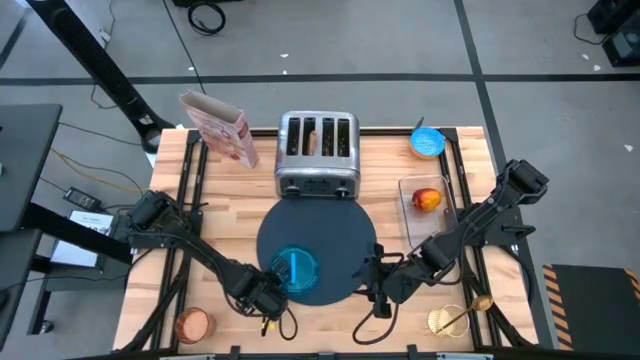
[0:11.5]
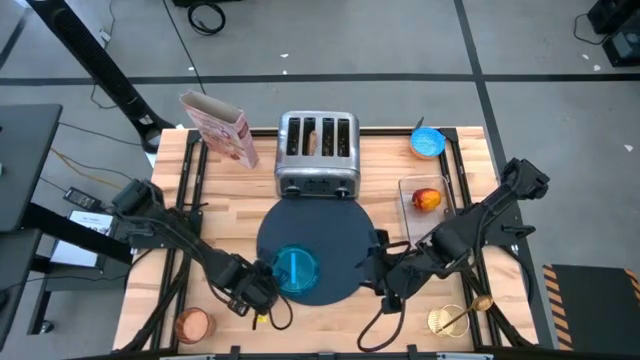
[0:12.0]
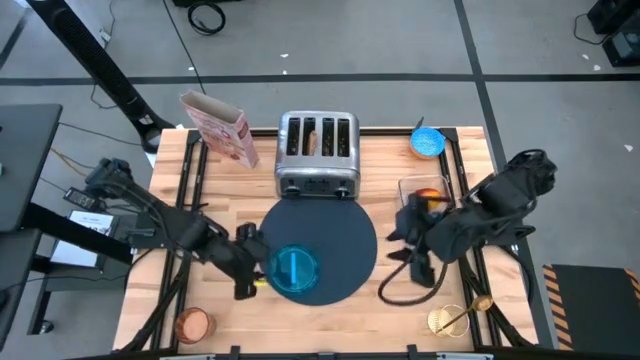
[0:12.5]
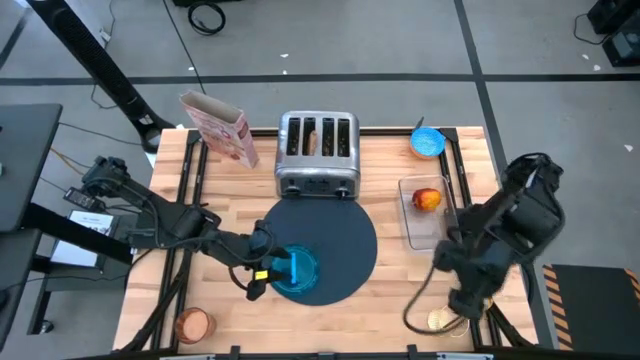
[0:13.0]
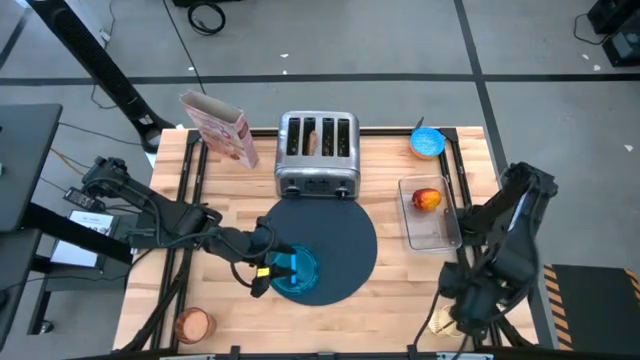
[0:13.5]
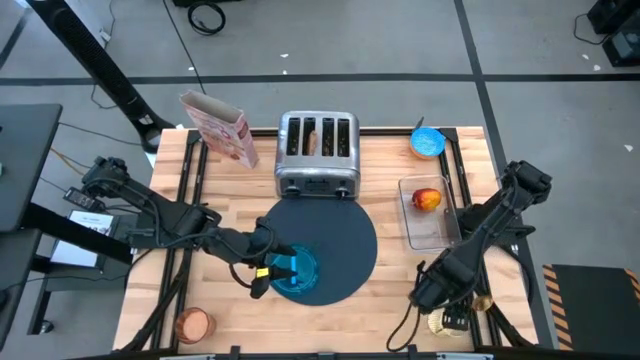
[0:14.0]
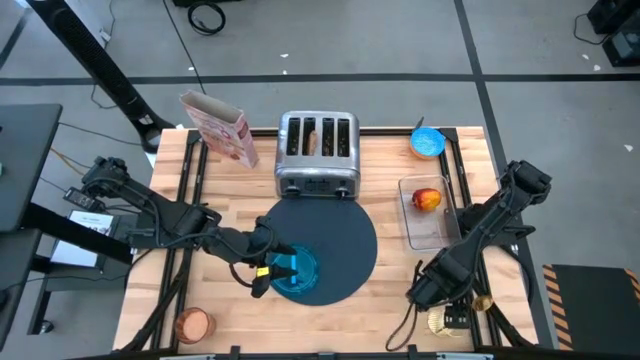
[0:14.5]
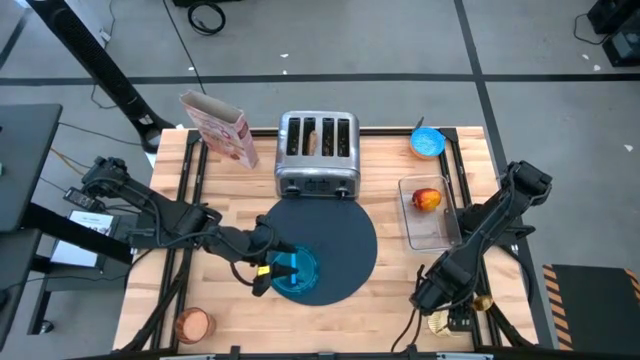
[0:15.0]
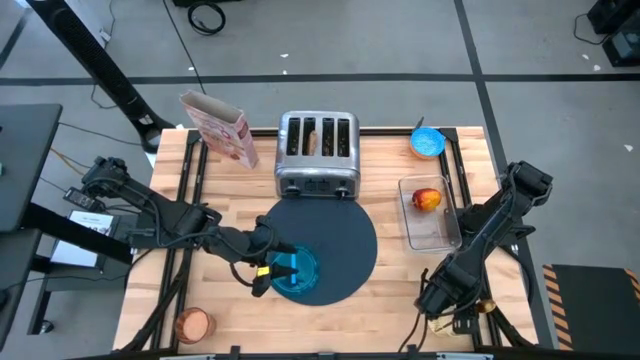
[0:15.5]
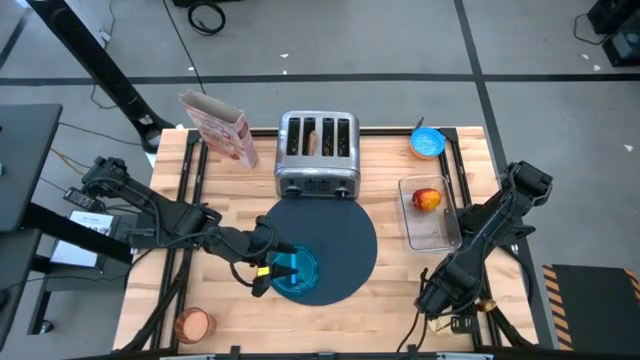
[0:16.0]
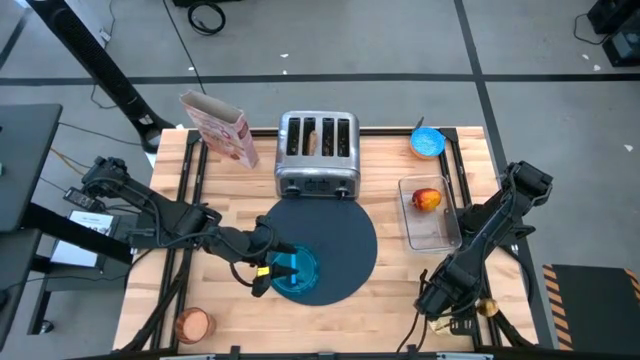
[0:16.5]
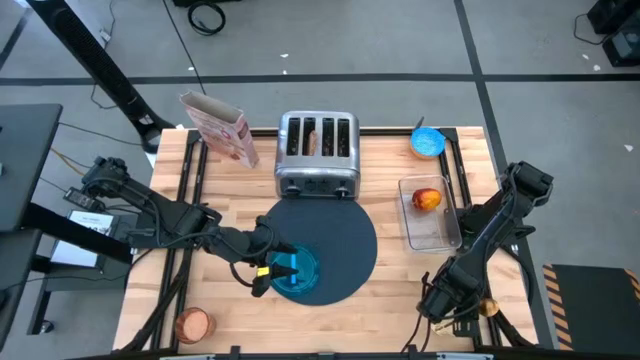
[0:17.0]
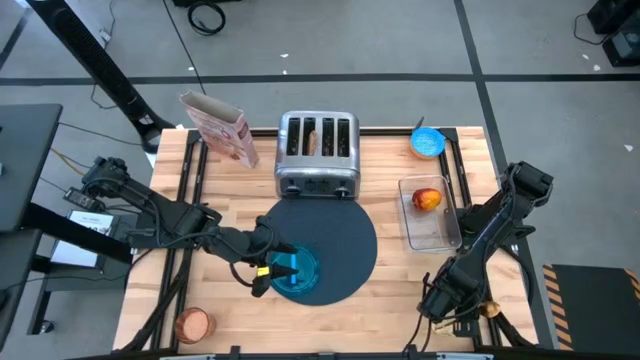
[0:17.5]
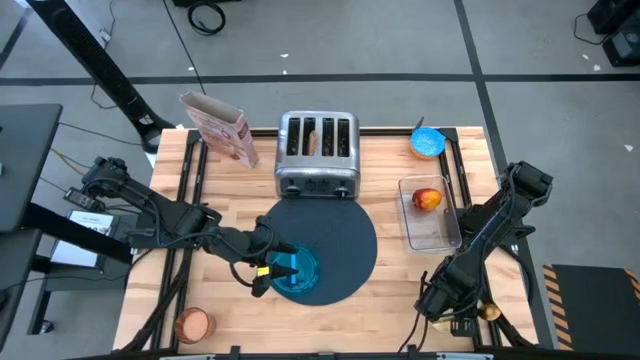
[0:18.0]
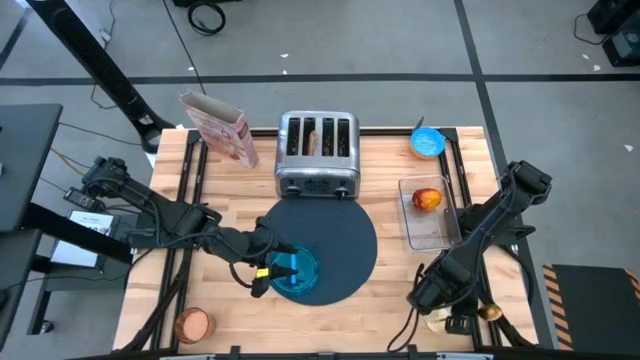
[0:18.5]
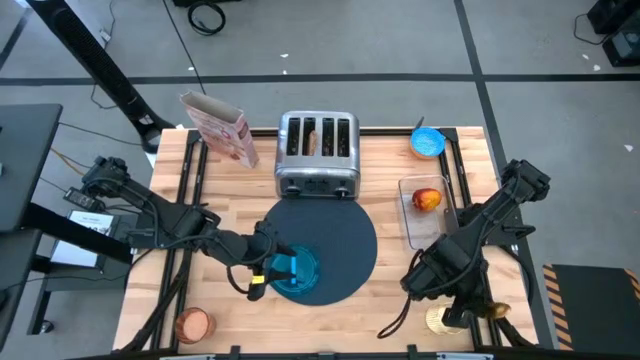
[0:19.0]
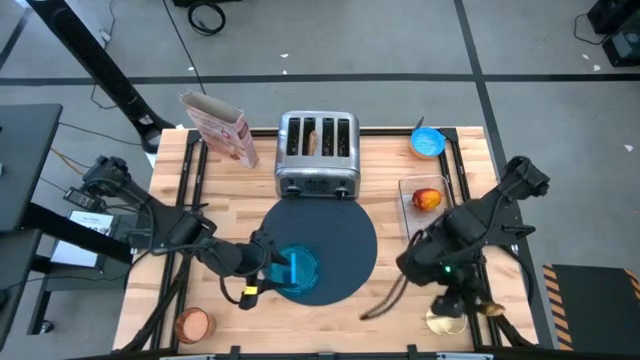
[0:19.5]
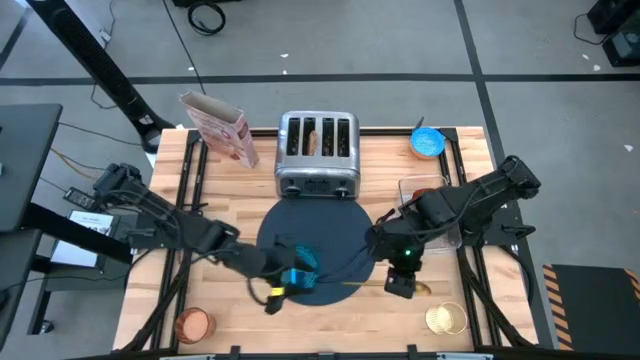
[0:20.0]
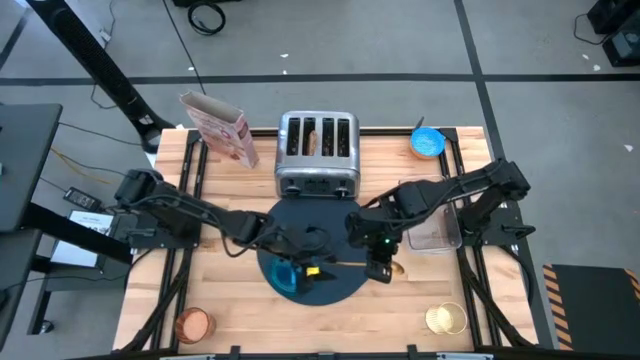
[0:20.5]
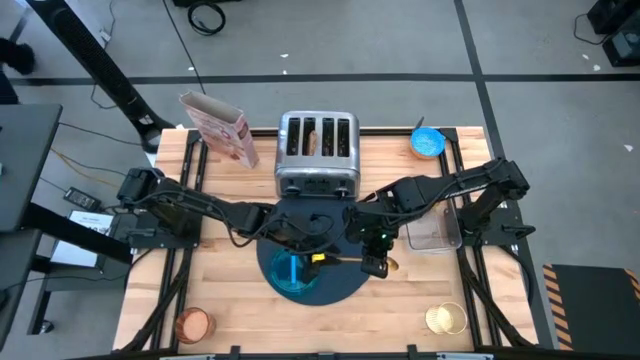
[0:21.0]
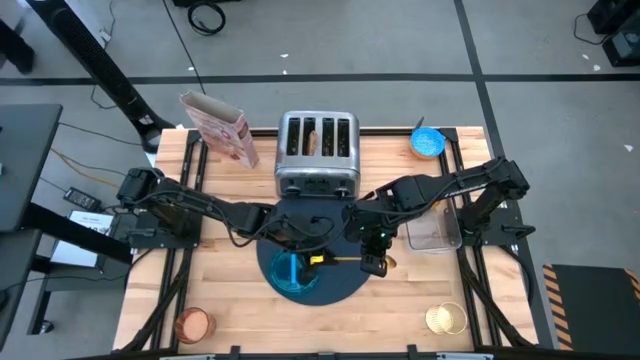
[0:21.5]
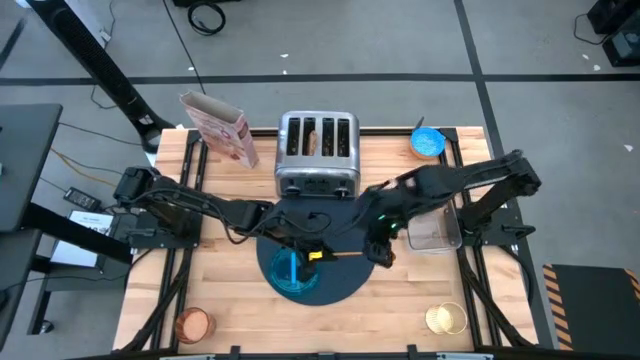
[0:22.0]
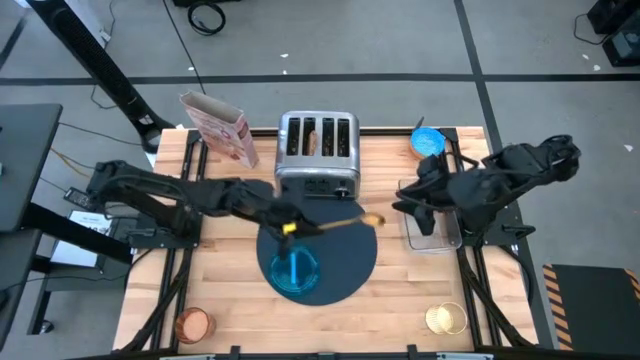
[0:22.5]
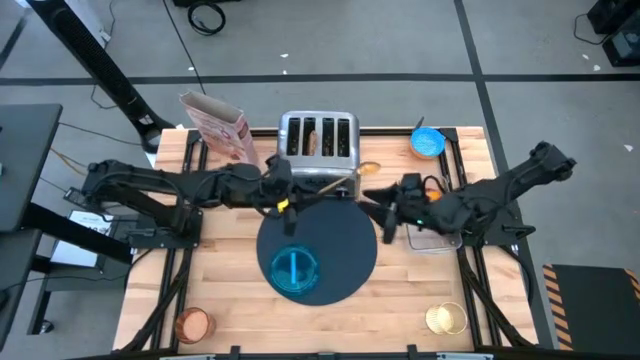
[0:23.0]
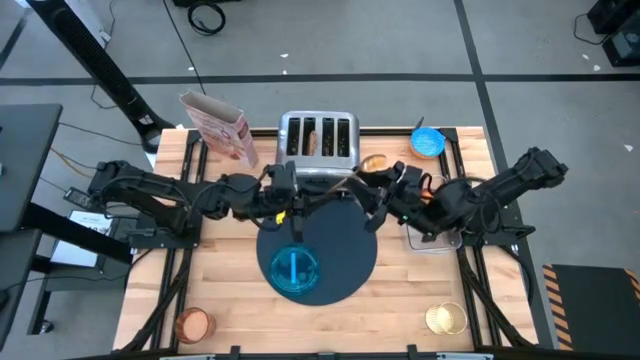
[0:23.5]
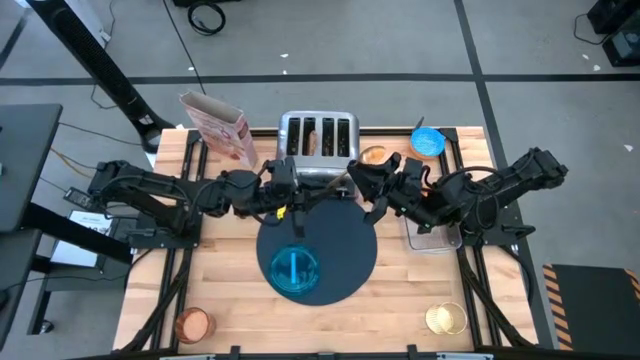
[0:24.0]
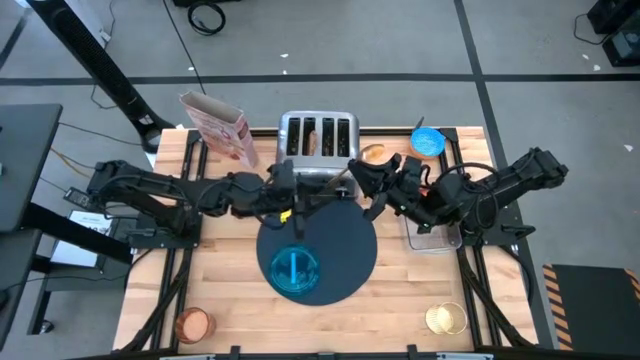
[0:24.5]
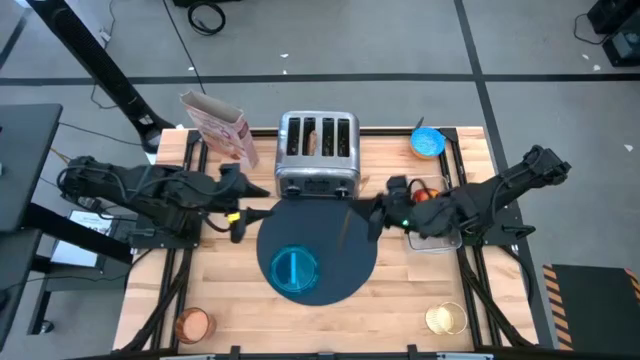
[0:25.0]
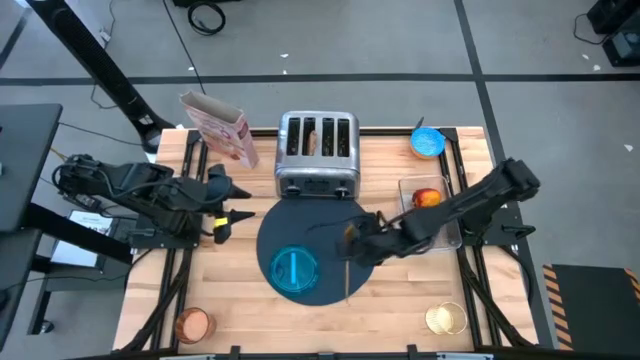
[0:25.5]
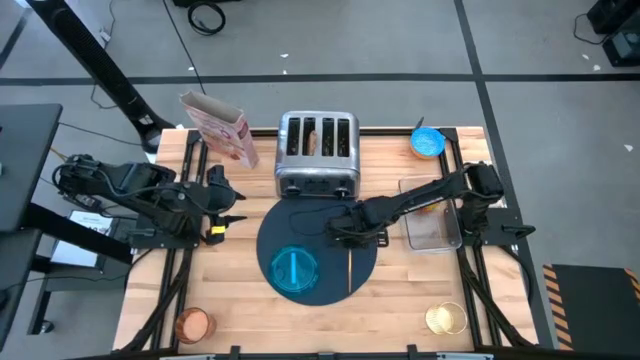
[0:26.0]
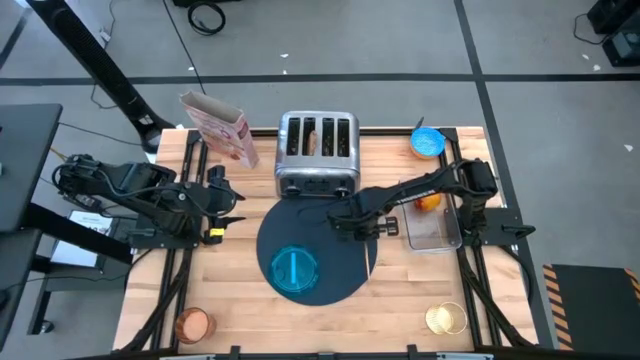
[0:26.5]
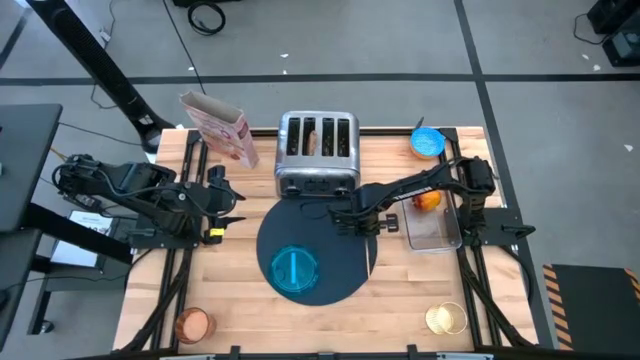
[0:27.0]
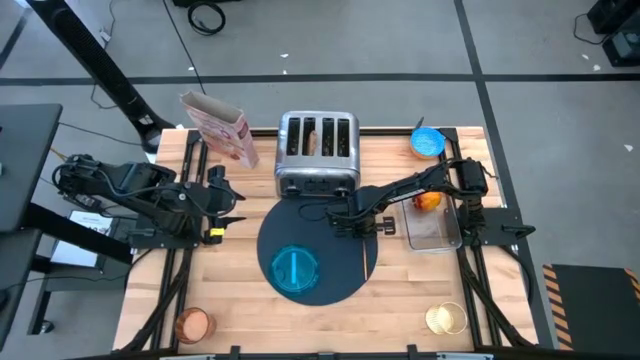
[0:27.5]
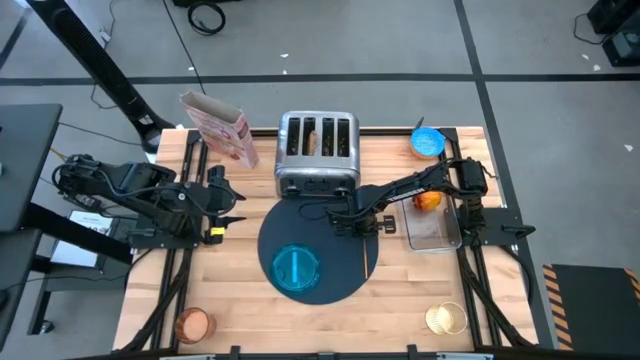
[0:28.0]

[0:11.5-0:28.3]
Task: Arrange a breakfast setting
Put the yellow spoon on the blue table mat

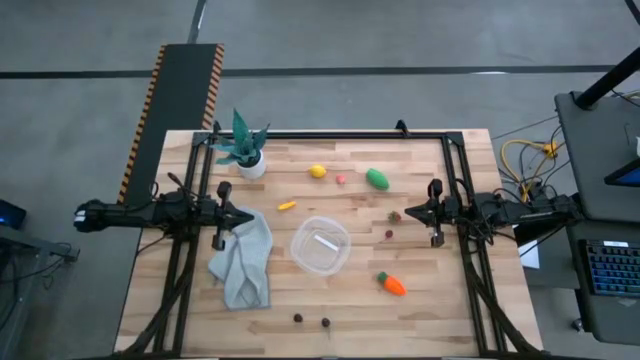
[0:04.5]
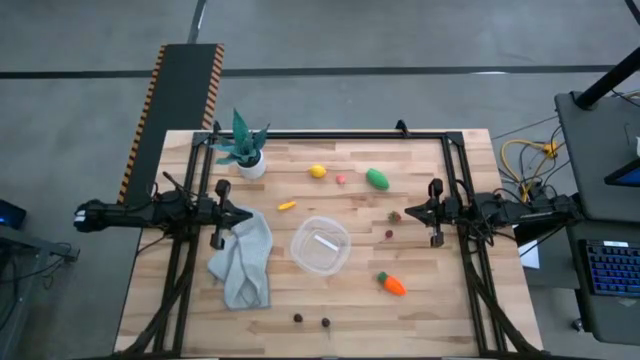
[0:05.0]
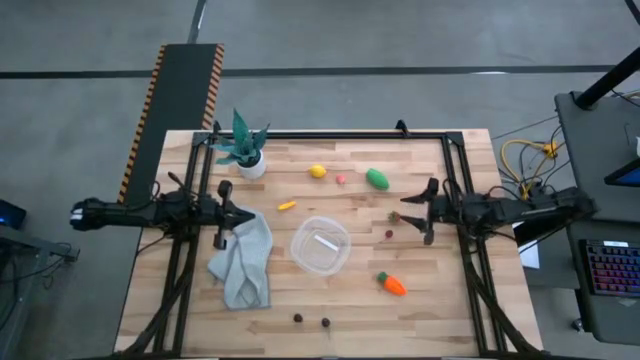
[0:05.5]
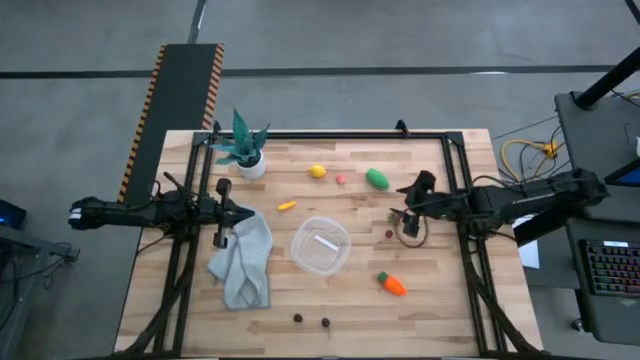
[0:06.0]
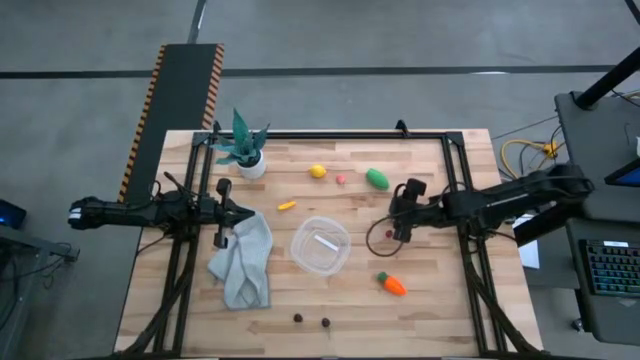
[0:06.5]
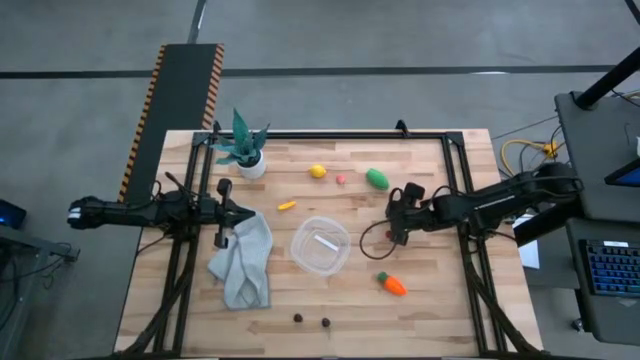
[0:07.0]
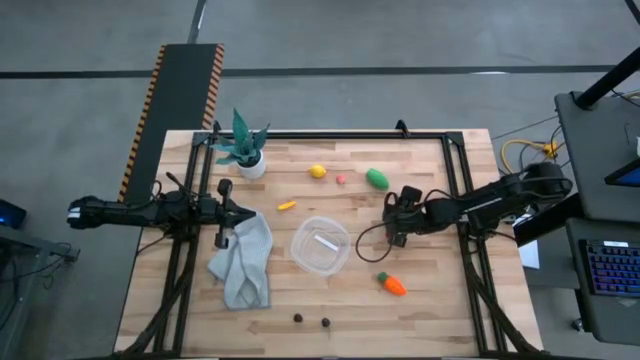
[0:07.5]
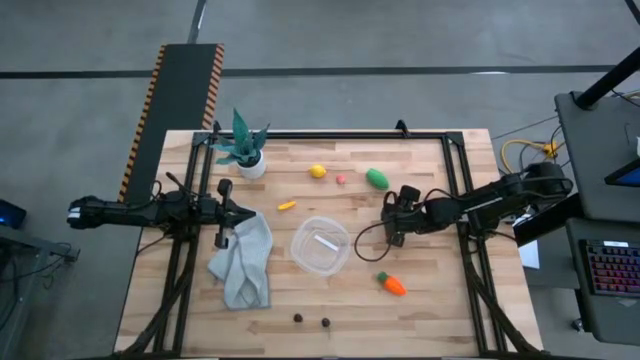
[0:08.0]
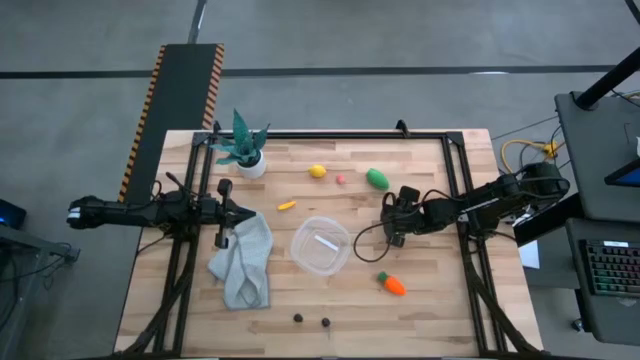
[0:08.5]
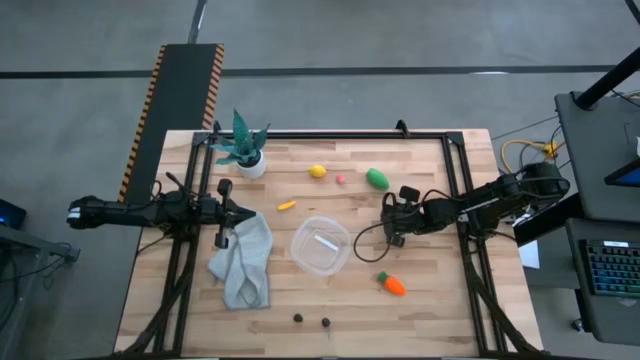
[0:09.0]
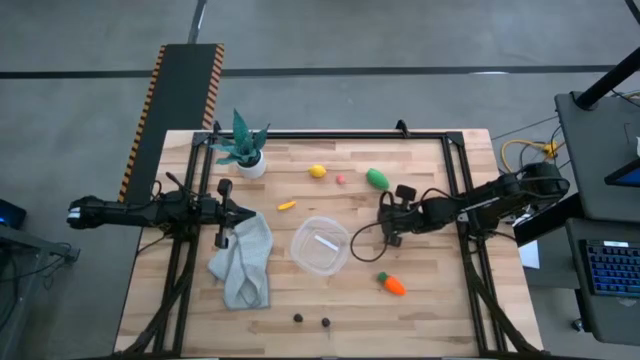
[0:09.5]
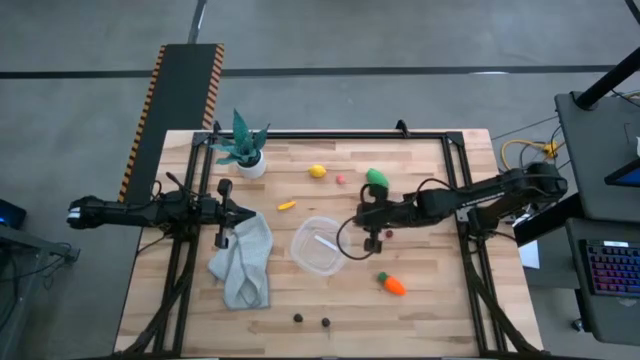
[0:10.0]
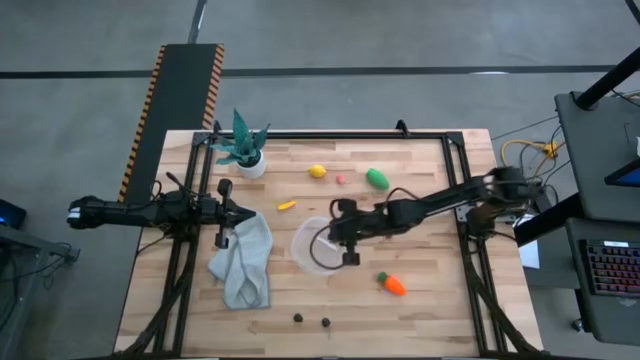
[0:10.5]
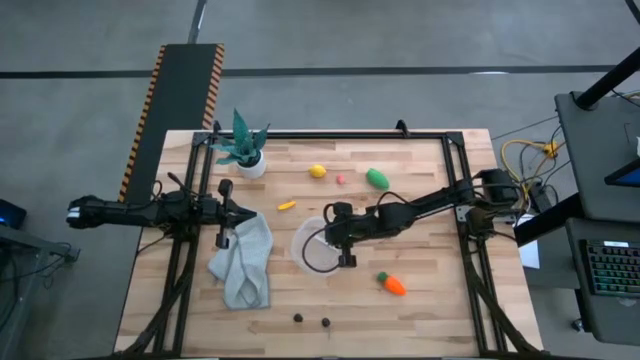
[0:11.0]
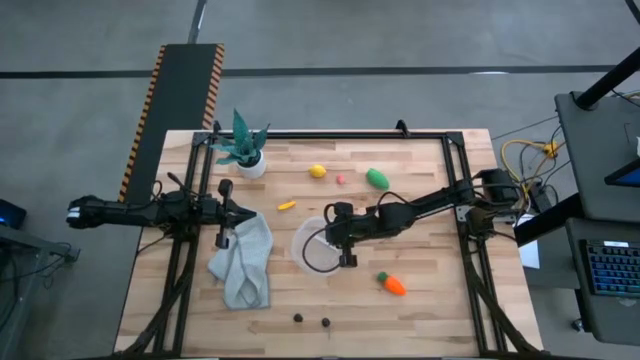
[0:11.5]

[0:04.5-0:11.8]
Task: Pick and placing Produce into tupperware
Put the red strawberry into the transparent bin
